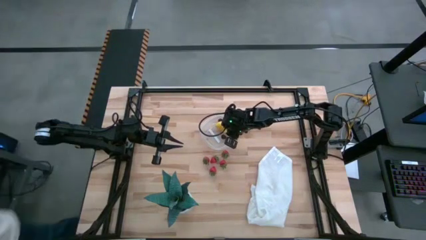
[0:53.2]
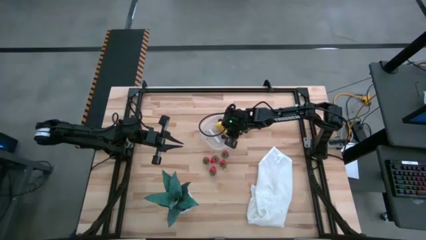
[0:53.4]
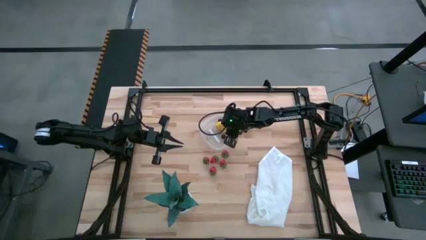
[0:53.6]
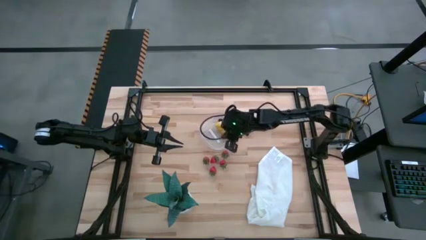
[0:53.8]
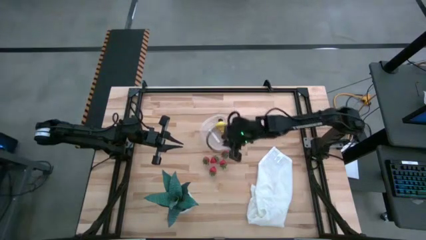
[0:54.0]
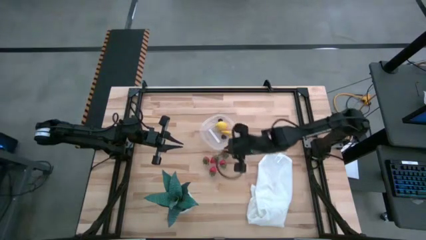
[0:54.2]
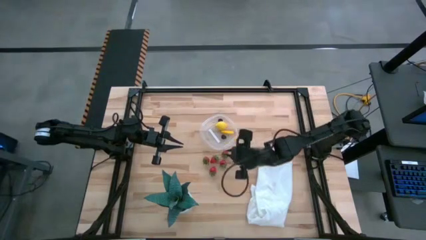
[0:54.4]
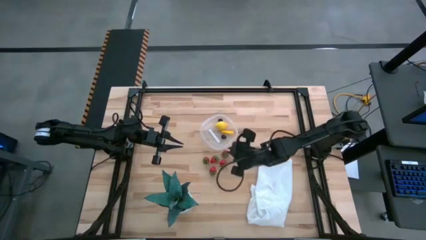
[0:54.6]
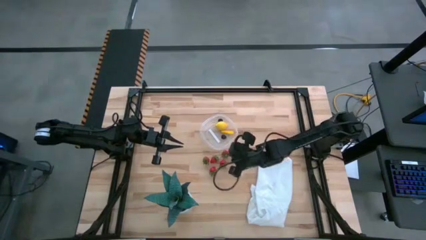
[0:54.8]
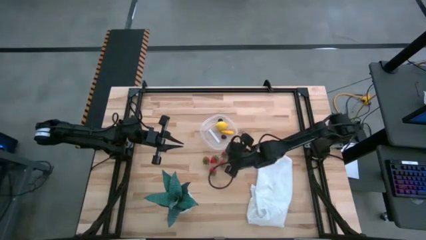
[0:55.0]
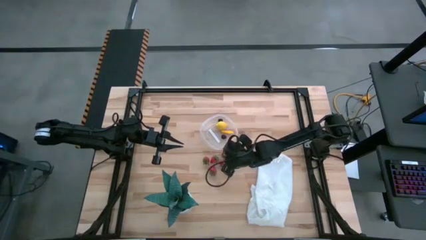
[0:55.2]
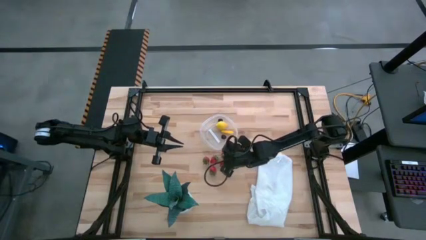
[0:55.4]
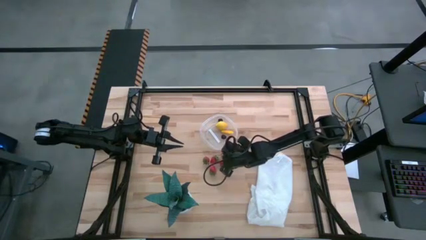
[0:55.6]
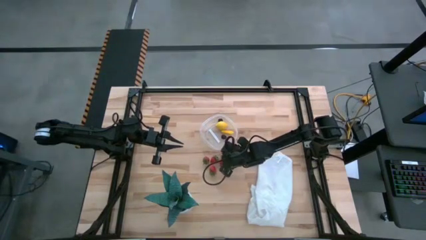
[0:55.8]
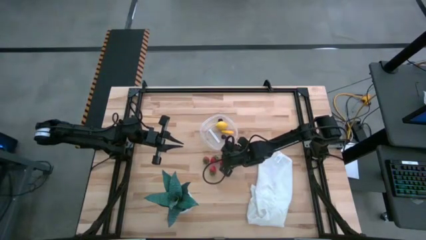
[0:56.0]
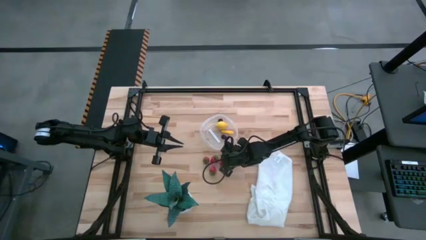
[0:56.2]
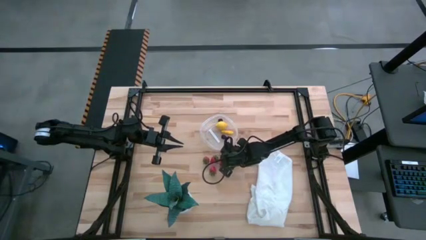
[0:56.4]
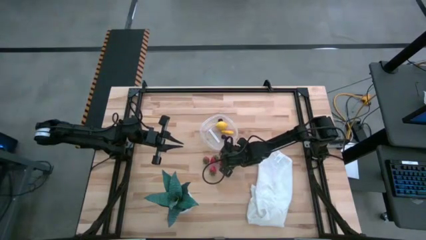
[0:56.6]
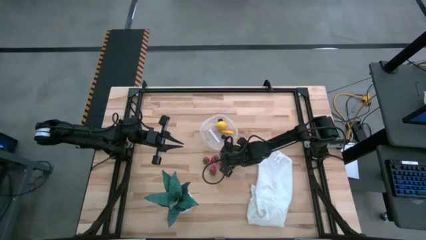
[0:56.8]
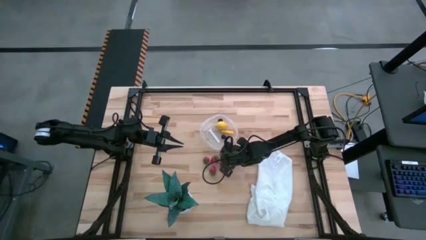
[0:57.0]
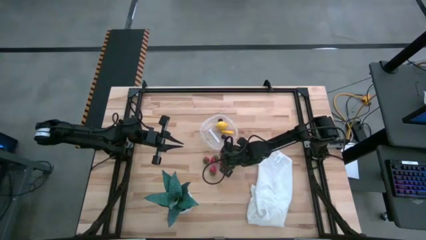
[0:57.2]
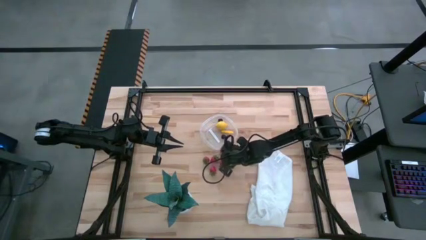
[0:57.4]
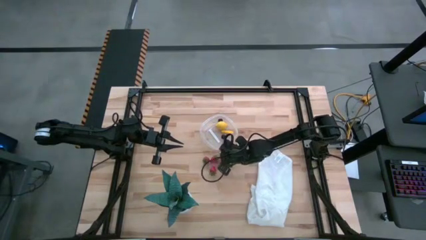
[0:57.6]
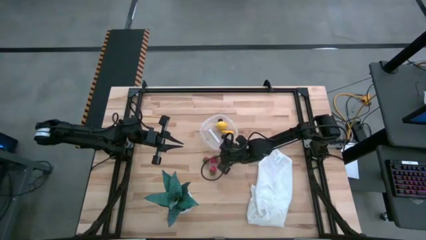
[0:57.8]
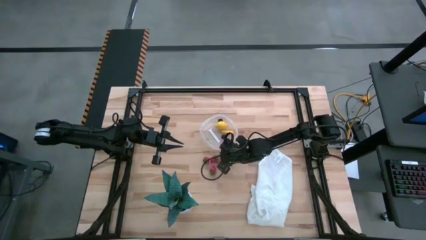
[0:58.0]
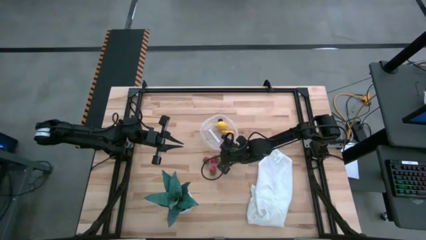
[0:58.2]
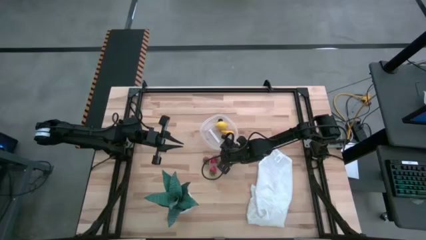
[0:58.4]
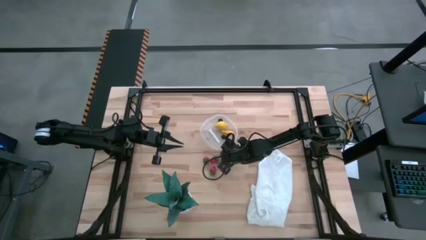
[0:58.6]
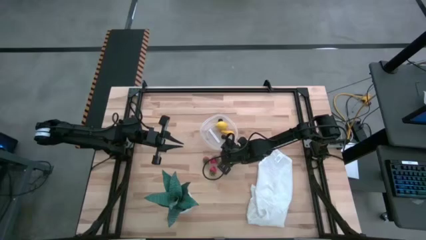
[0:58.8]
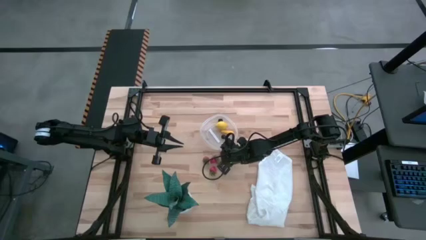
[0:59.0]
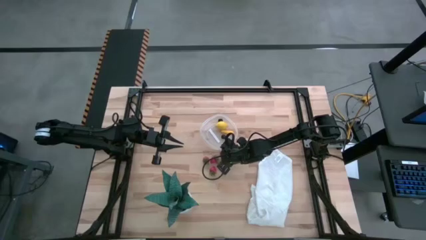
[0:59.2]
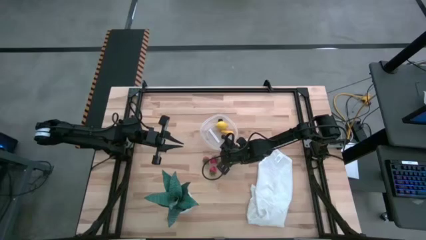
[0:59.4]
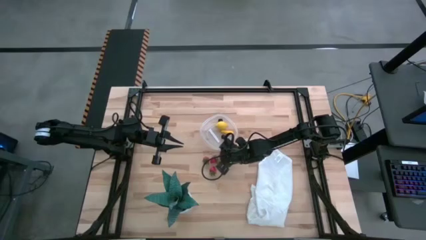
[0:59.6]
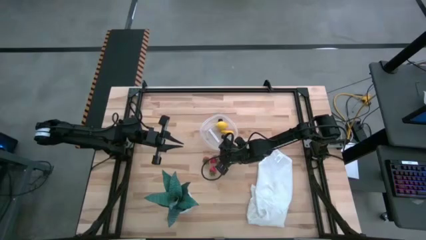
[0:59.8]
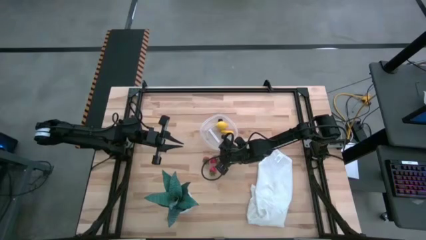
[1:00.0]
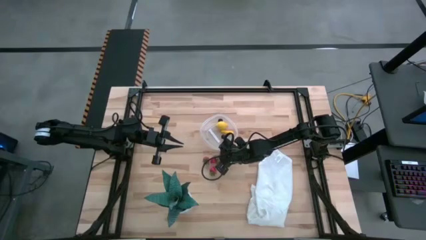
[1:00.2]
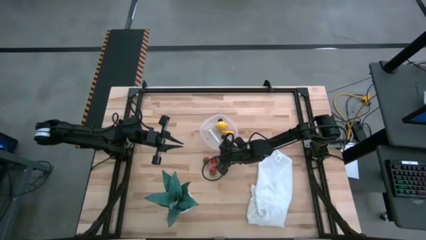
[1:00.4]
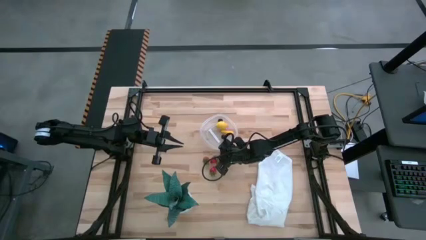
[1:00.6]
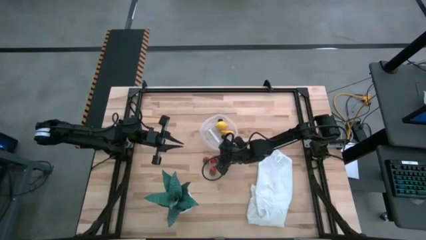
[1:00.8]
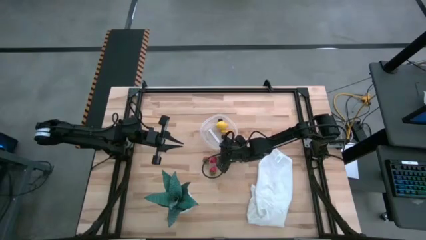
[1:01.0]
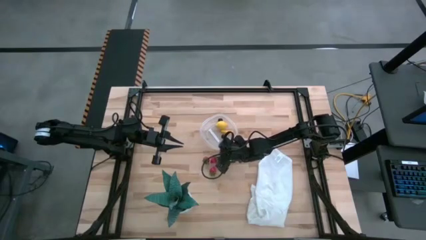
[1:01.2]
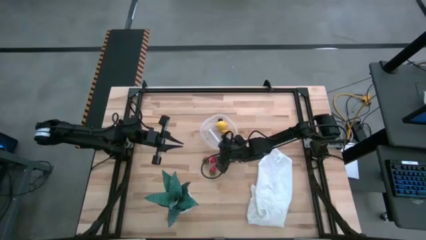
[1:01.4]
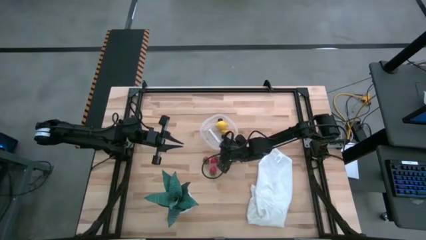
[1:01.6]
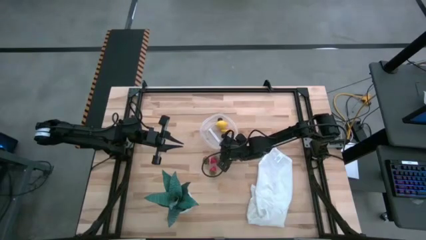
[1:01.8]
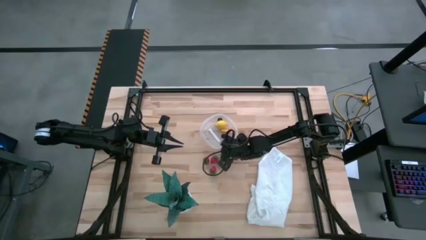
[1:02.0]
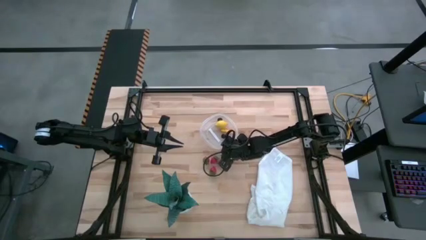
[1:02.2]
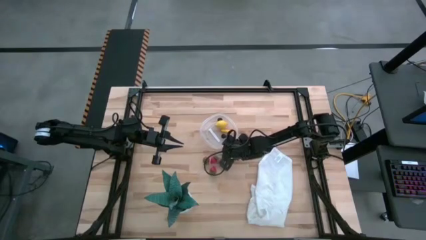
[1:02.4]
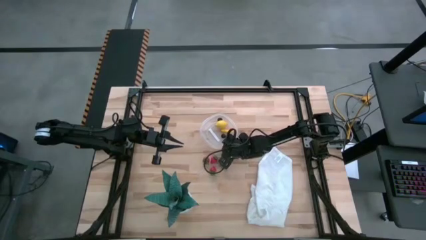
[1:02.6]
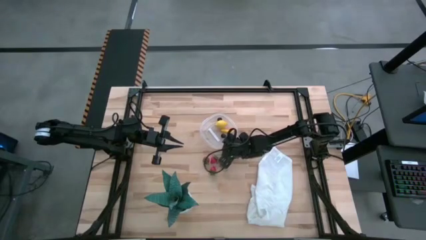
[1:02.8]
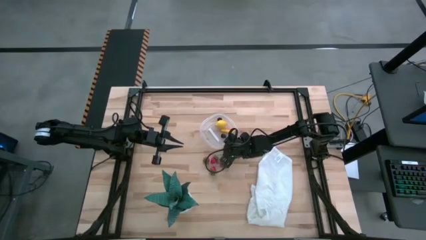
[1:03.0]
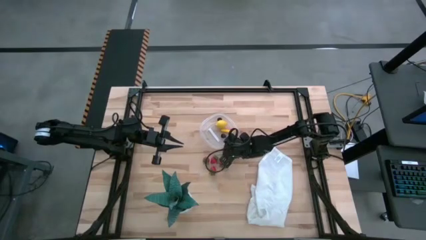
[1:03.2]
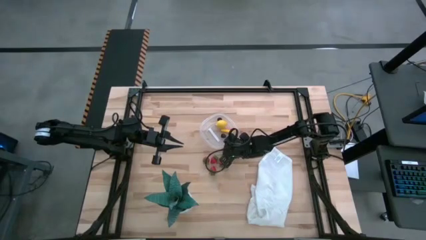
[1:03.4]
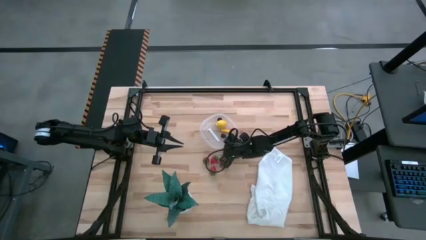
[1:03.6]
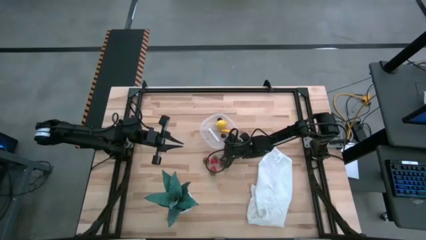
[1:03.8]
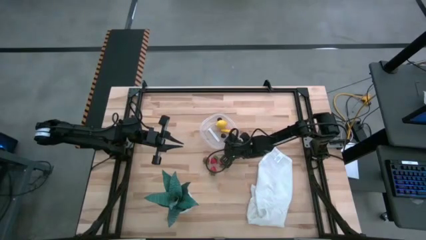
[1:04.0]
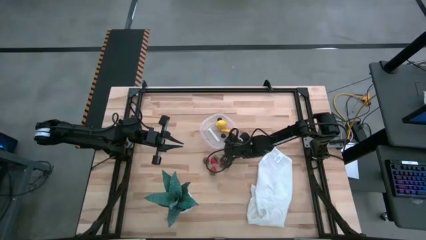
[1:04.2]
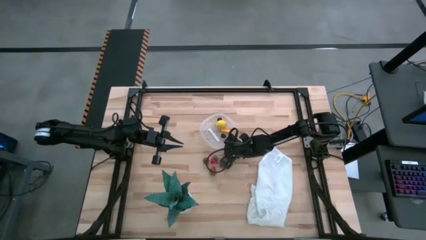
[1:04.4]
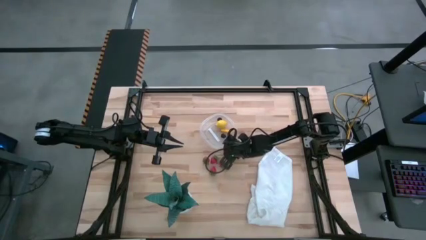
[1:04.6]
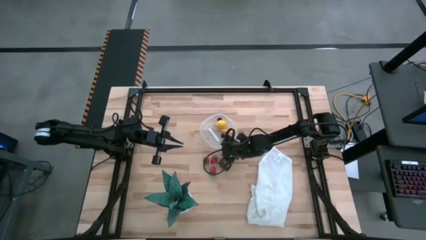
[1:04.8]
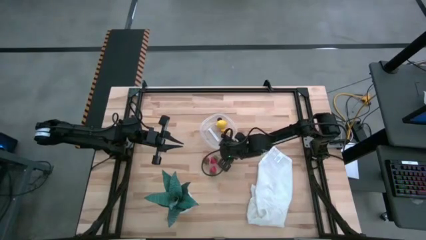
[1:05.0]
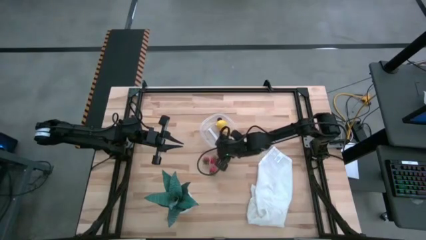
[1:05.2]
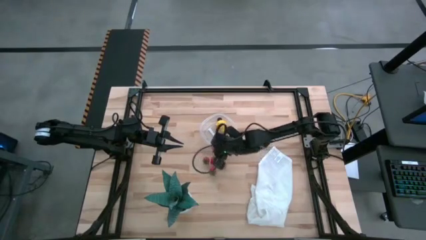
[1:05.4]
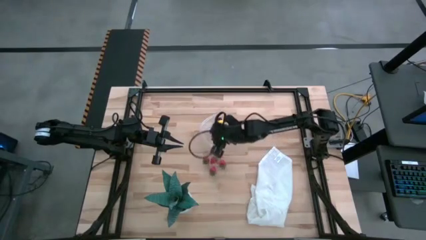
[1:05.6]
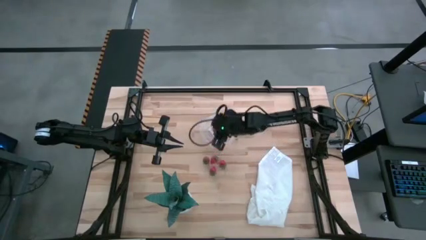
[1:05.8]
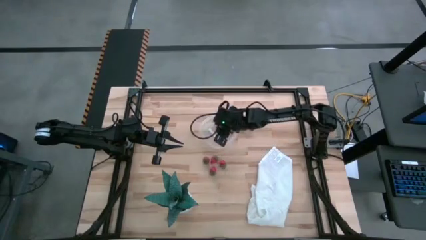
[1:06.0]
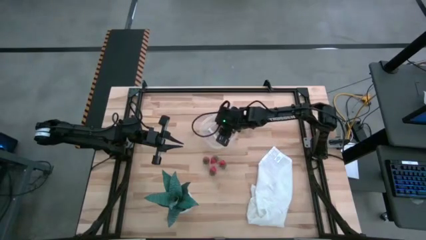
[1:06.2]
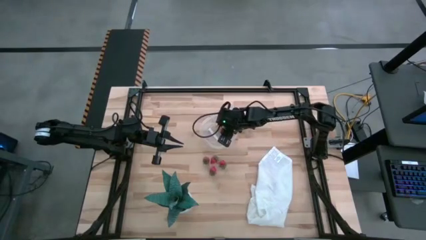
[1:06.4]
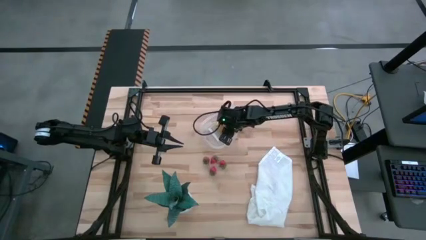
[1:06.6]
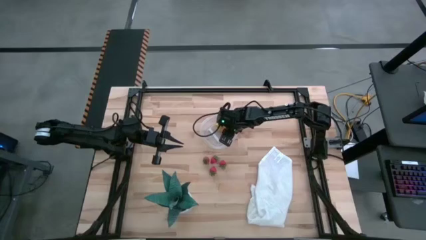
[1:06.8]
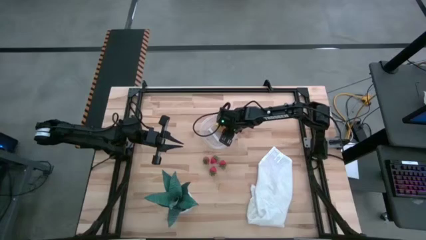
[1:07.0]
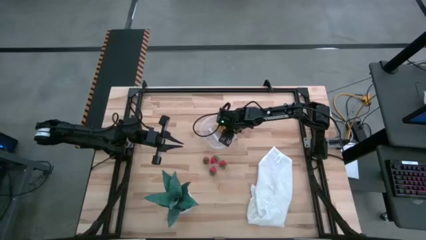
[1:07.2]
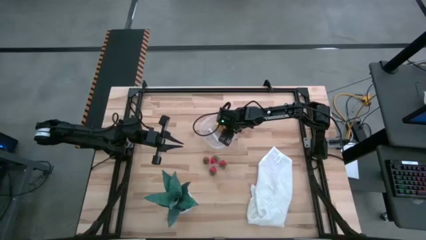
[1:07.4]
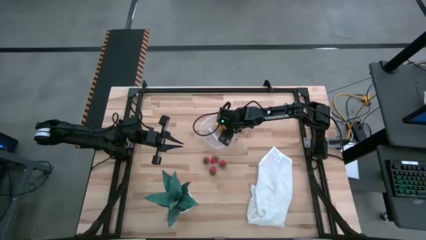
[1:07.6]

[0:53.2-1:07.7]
Task: Pick and placing Produce into tupperware
Put the strawberry into the bin

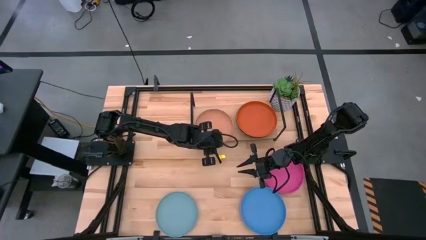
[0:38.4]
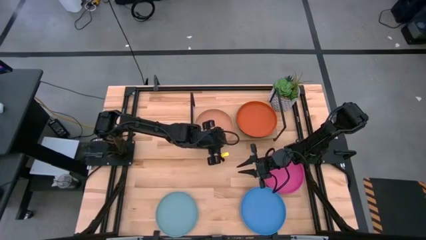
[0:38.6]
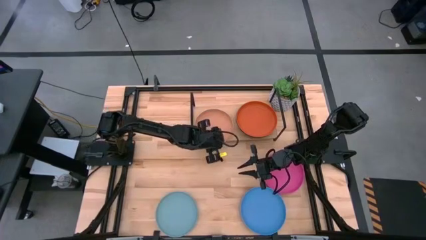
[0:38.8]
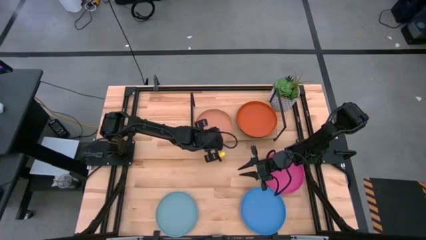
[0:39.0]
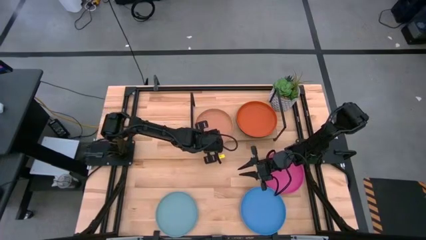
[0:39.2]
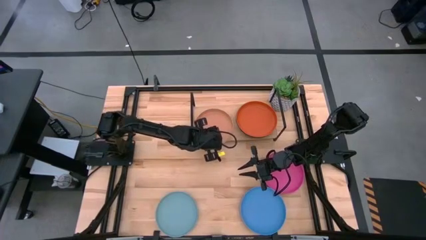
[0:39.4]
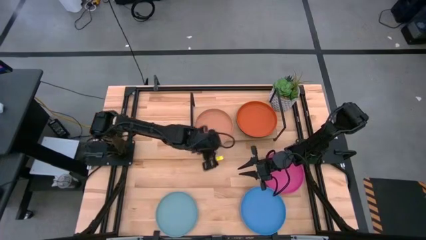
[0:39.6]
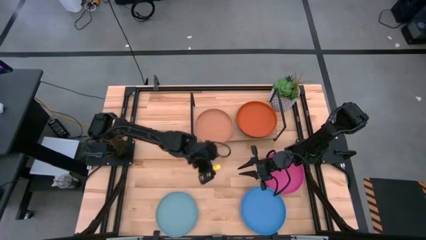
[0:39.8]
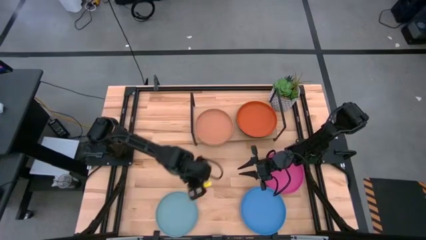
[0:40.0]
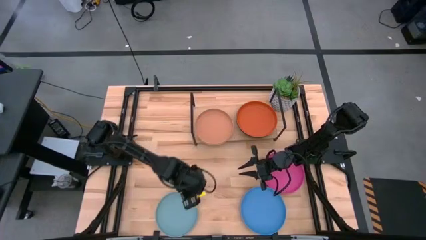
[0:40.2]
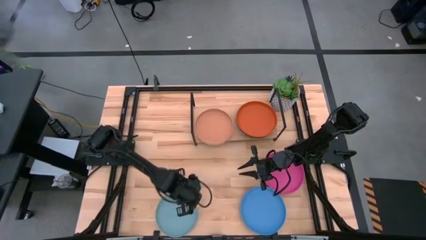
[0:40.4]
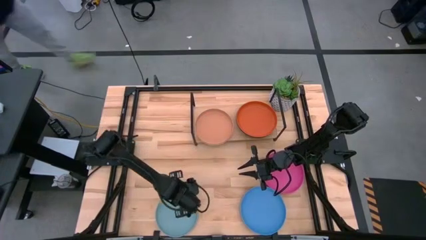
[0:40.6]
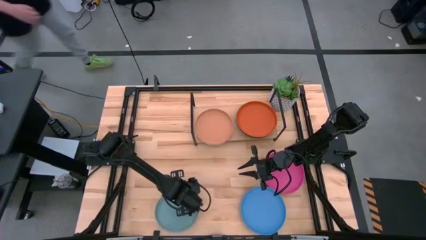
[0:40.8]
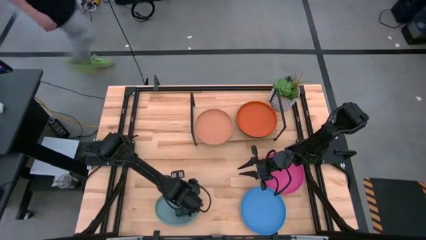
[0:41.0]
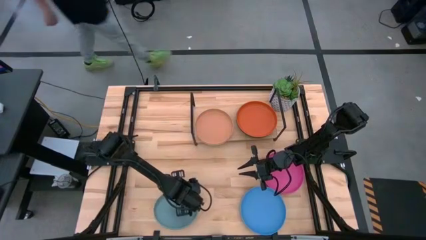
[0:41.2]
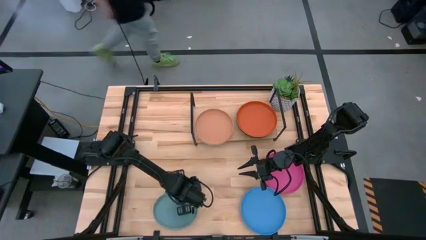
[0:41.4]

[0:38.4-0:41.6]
Task: Place and stack plates onto a shelf
Stack the light blue plate on top of the brown plate on the shelf
